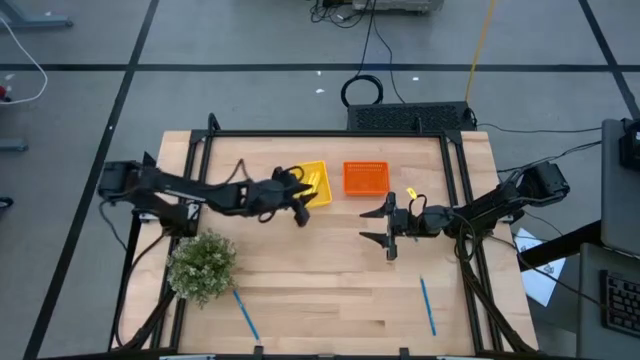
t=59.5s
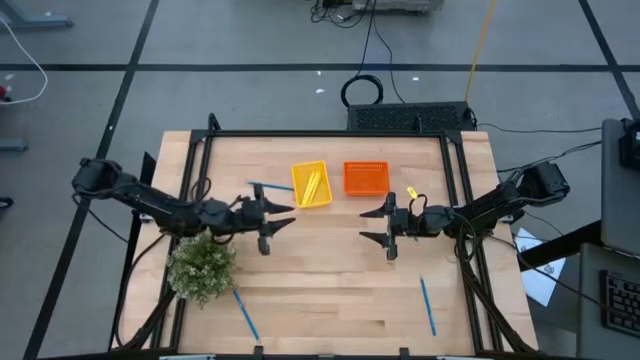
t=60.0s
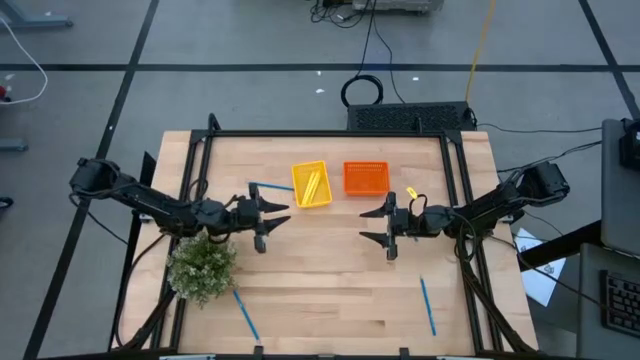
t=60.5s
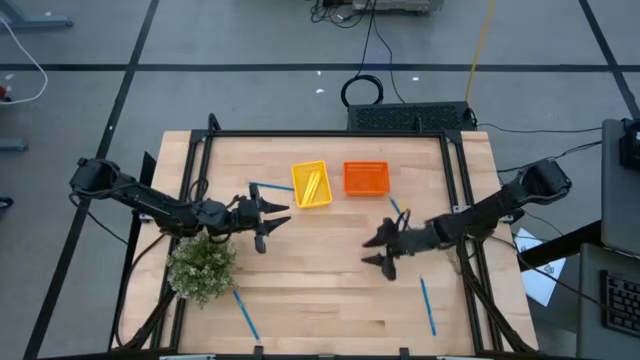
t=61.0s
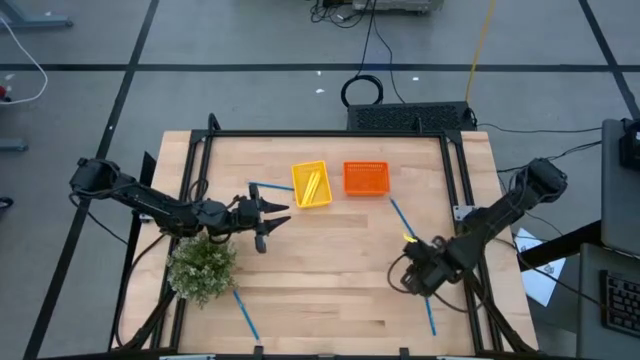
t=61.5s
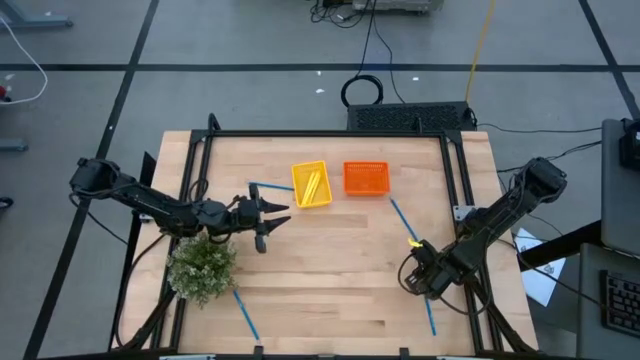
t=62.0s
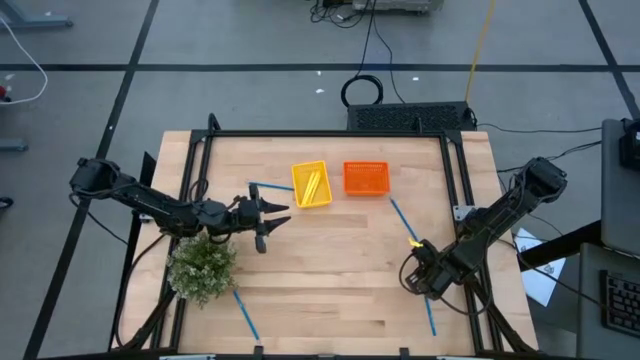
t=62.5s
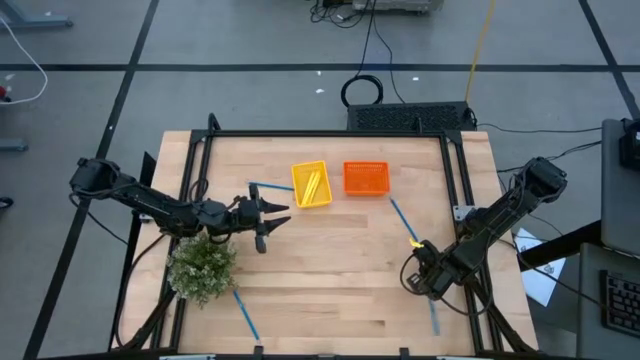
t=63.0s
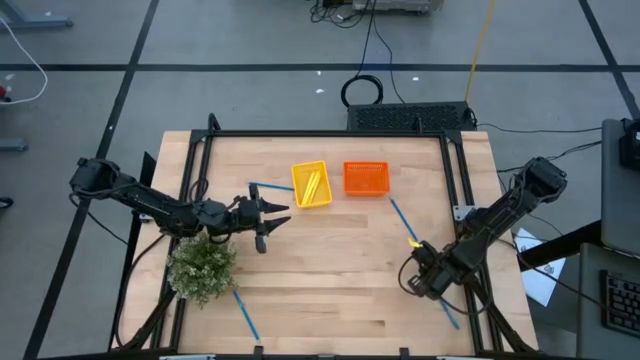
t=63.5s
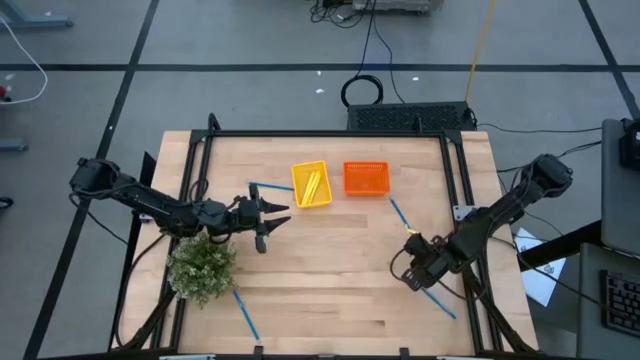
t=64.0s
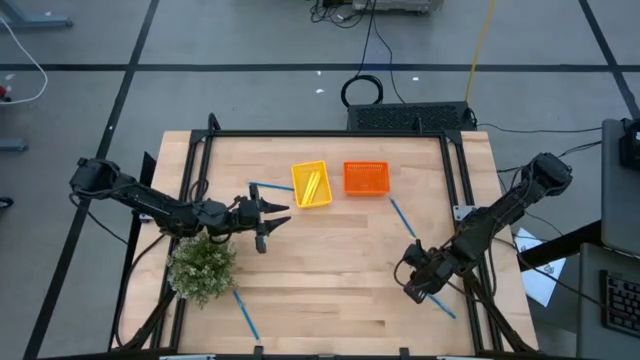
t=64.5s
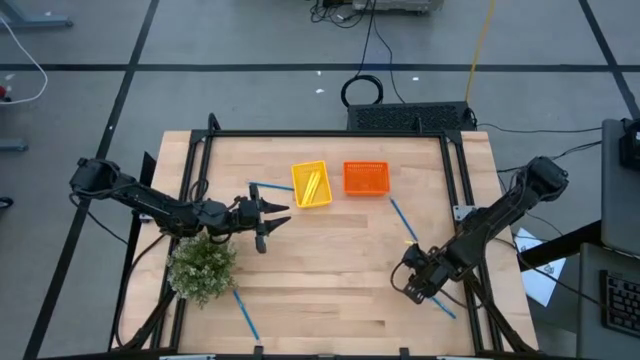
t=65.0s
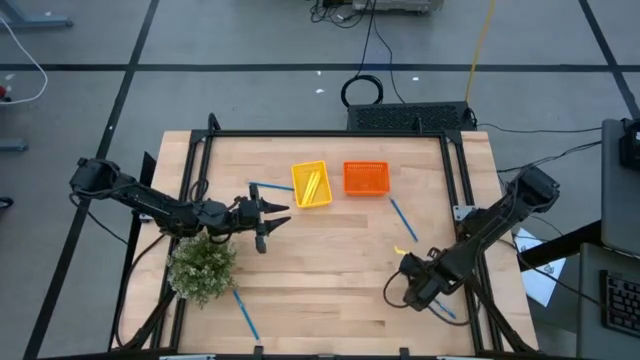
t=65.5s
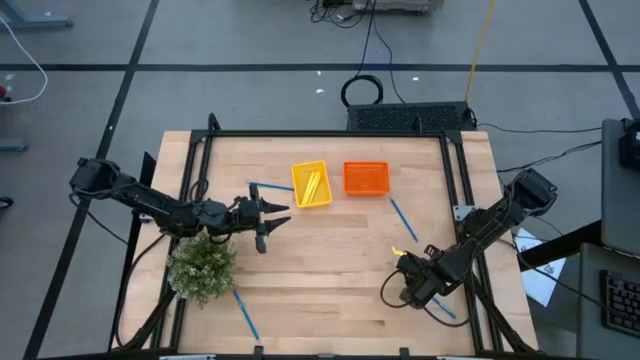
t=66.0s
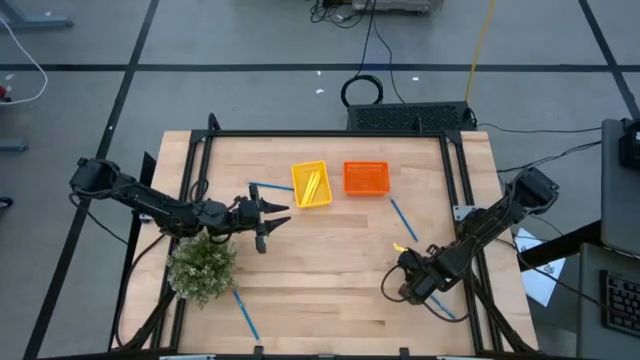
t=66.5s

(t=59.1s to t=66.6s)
Task: Sort pens & pencils
Put the bottom right blue pencil into the orange basket

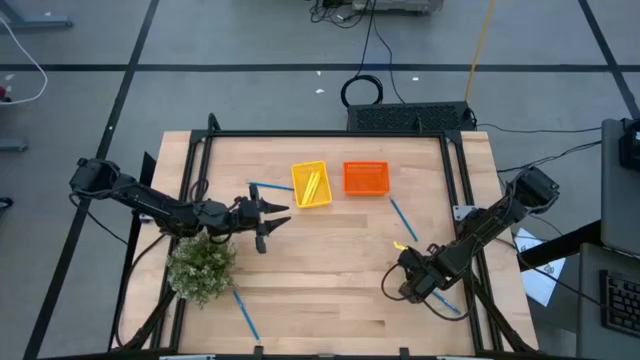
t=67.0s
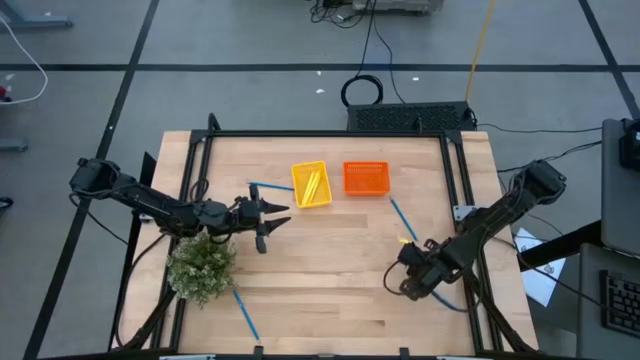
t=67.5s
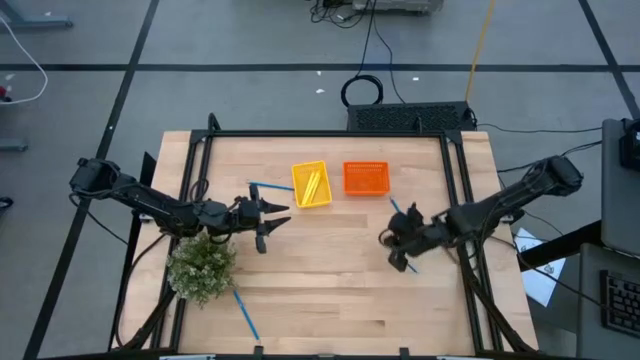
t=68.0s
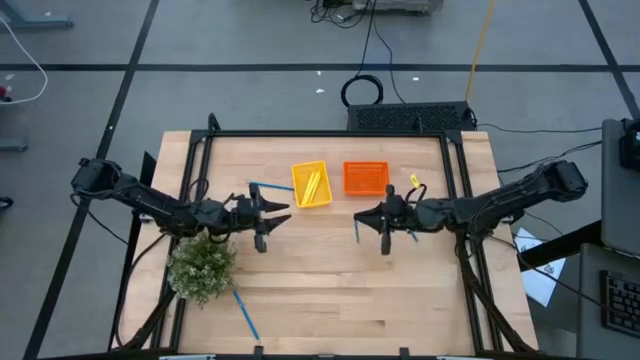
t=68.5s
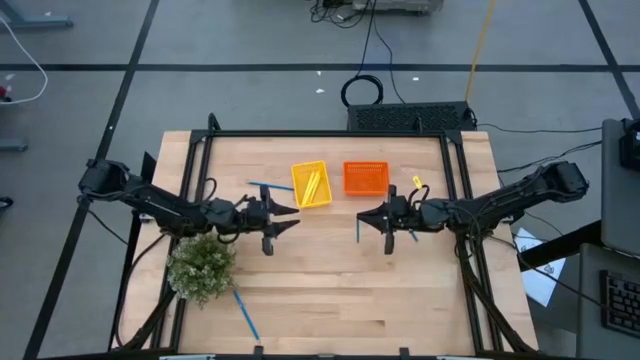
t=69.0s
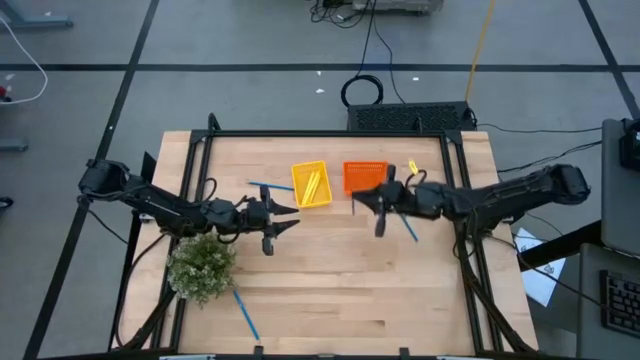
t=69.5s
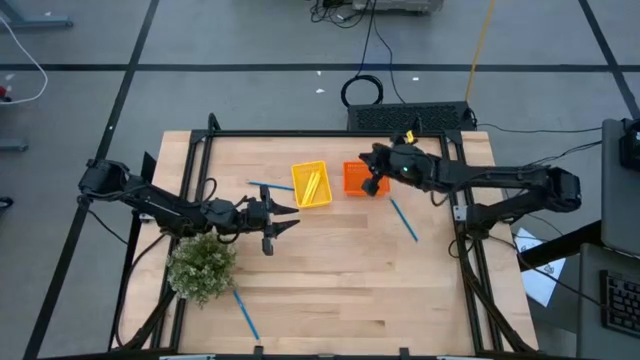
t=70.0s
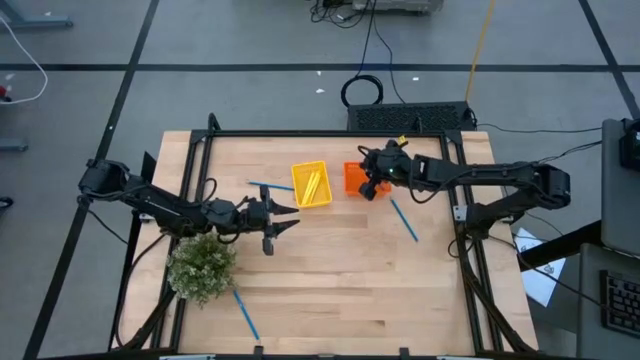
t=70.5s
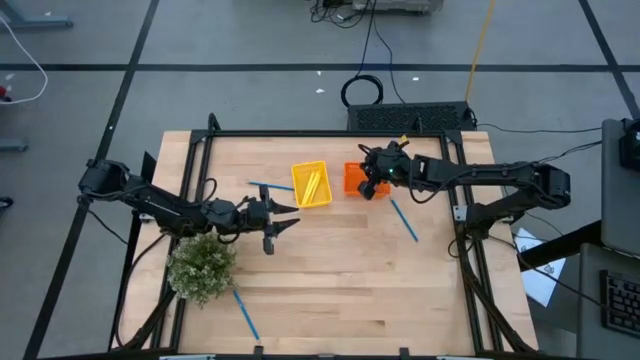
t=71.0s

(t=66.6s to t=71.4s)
Put the bottom right blue pencil into the orange basket

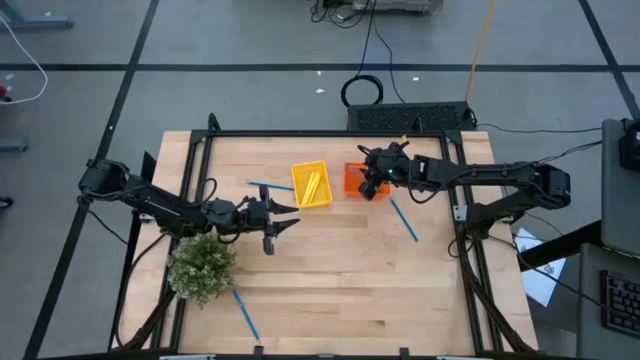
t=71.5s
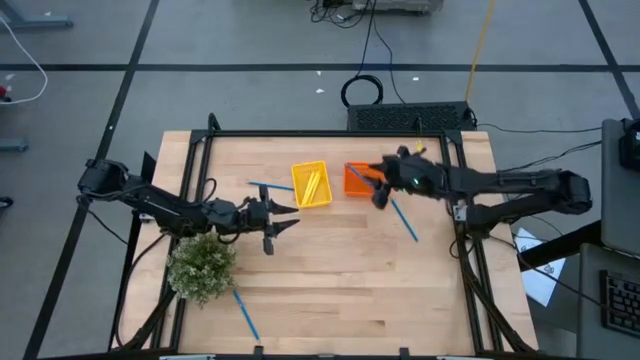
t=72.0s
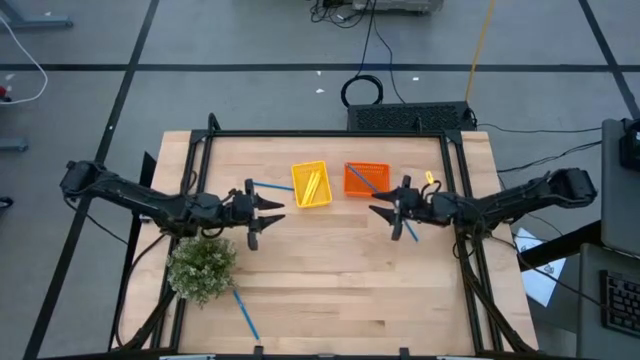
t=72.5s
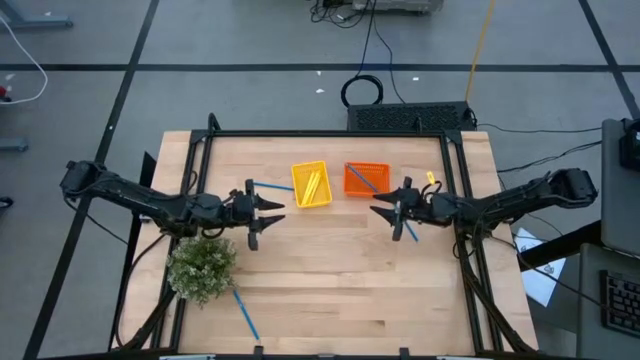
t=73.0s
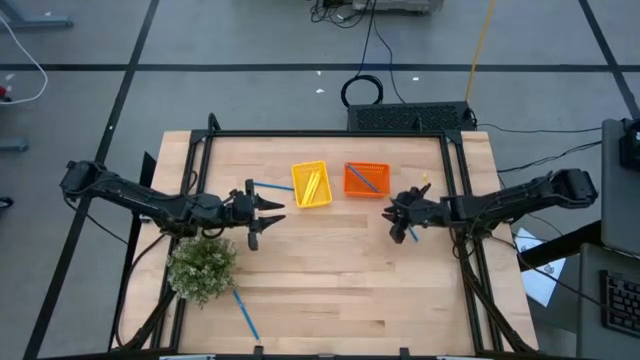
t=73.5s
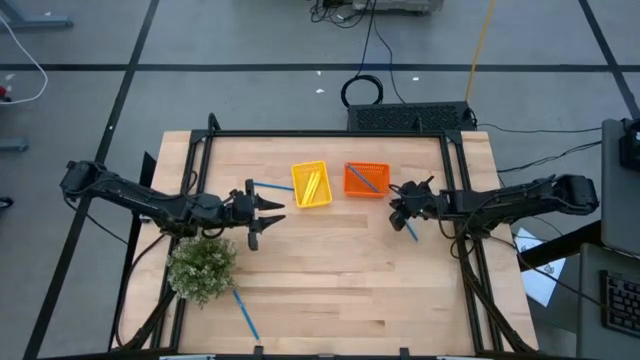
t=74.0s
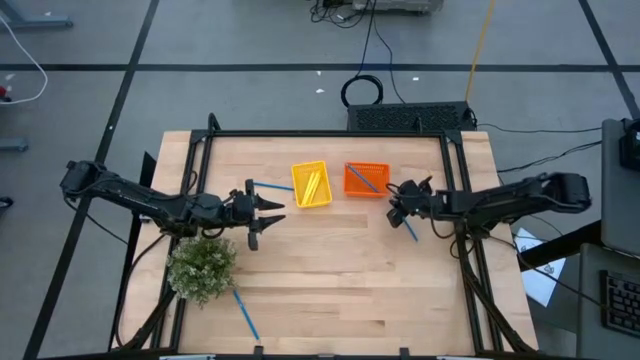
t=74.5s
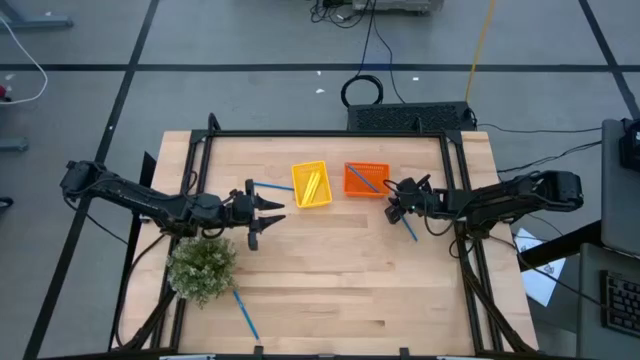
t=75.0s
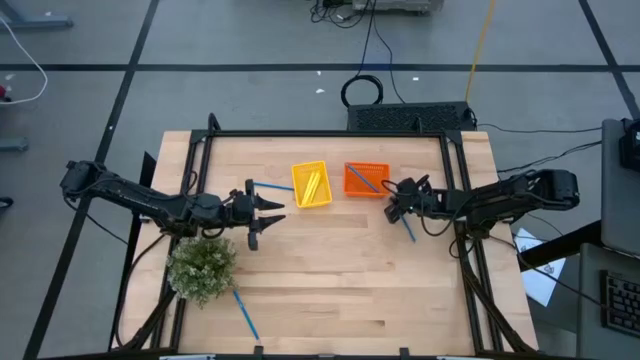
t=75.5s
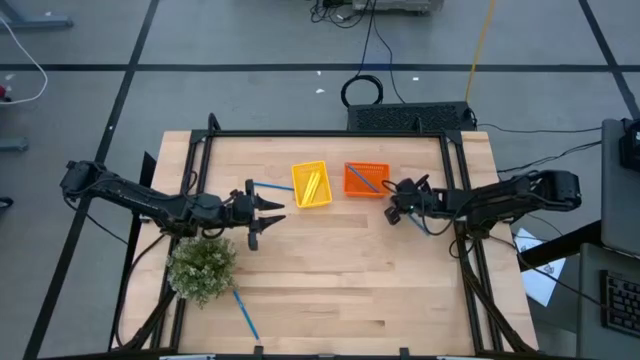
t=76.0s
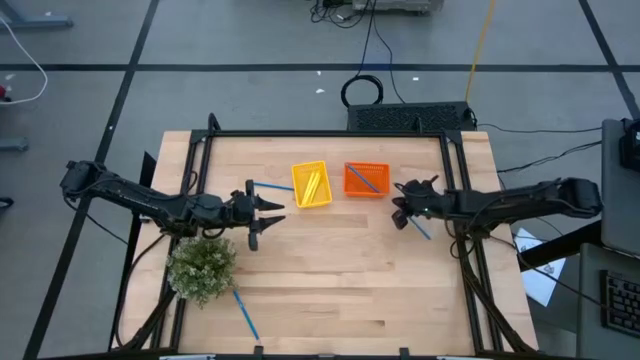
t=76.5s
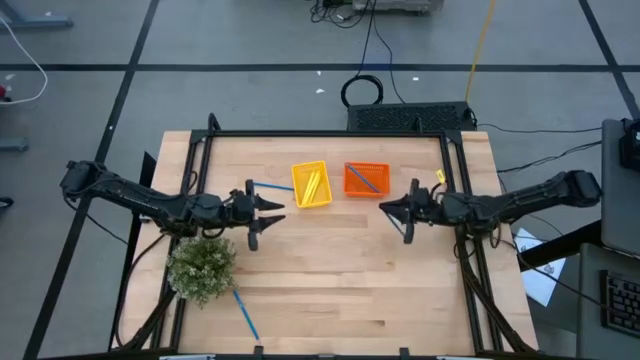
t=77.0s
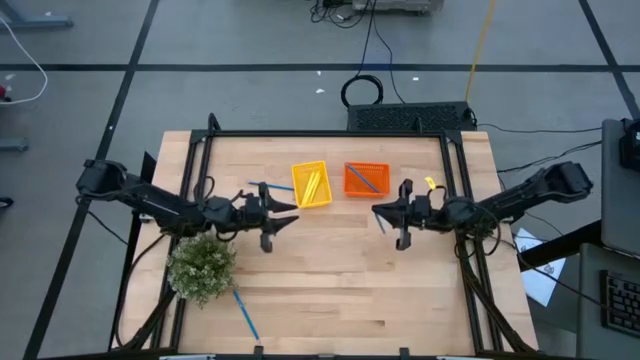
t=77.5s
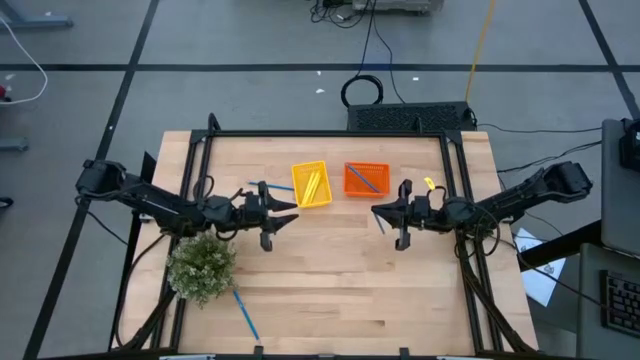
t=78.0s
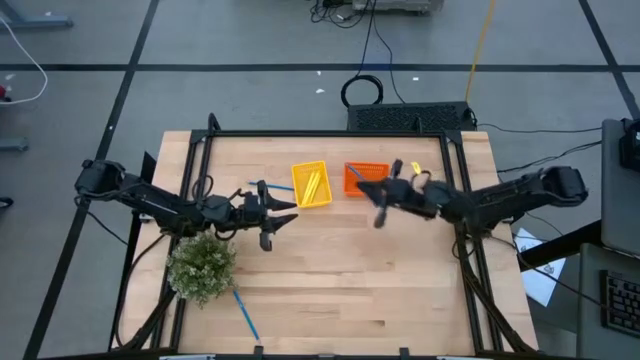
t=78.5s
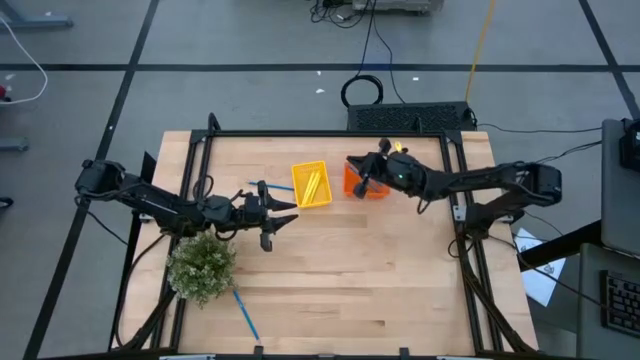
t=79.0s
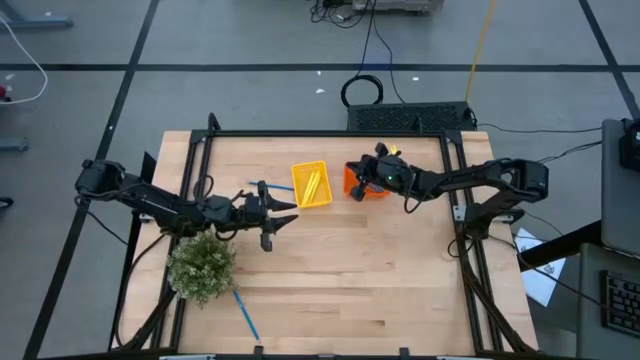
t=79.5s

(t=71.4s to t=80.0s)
Put the top right blue pencil into the orange basket

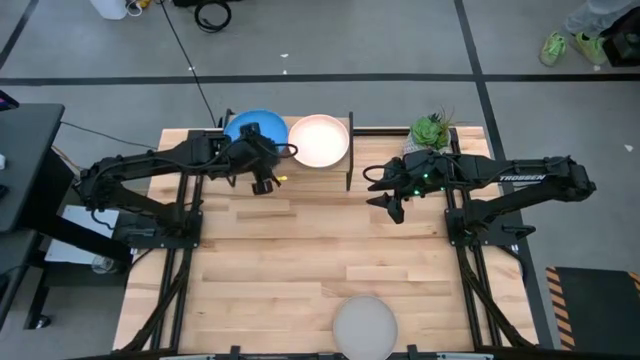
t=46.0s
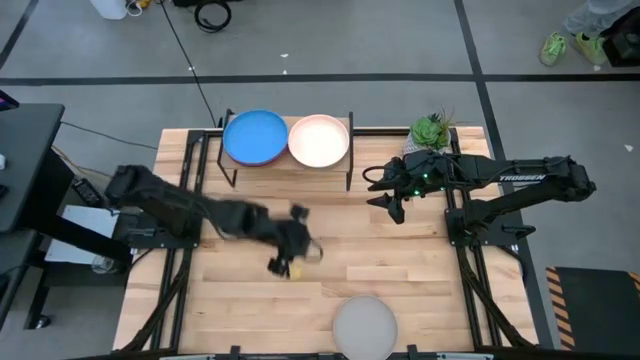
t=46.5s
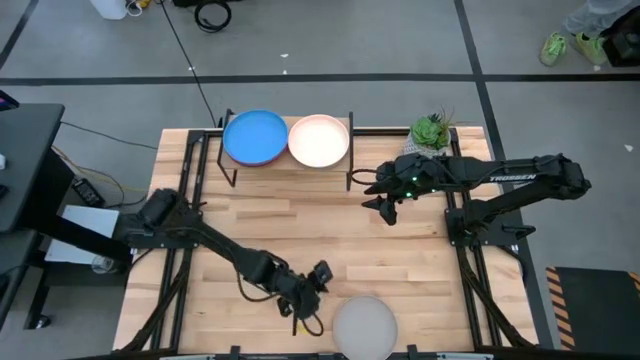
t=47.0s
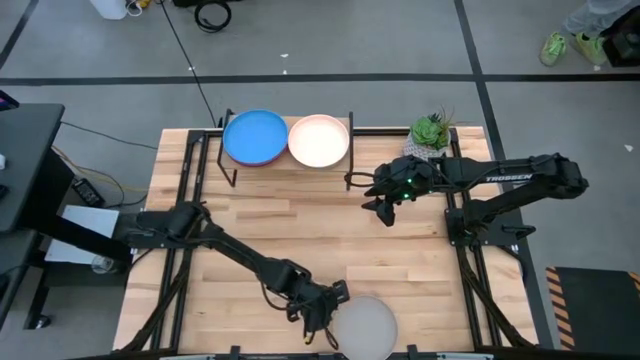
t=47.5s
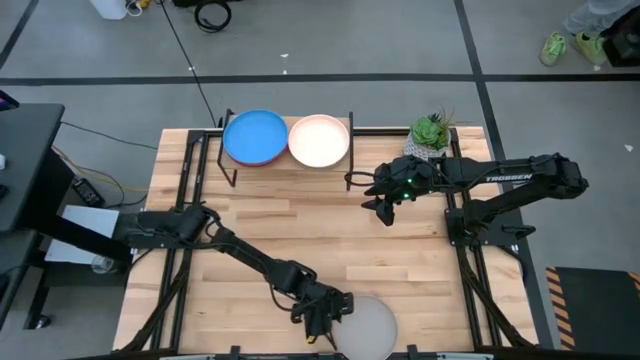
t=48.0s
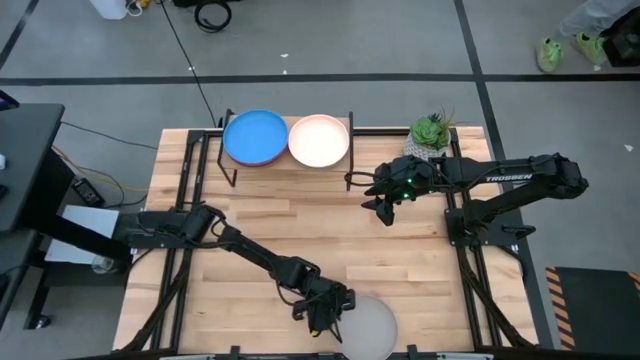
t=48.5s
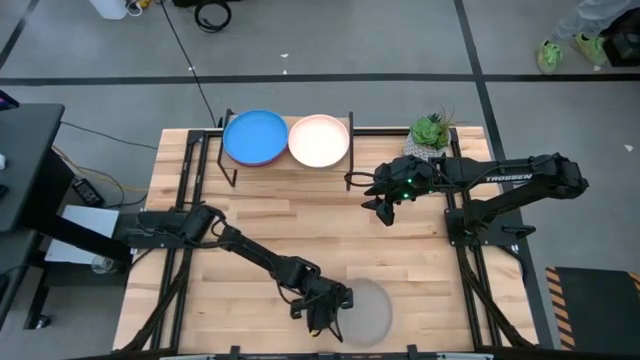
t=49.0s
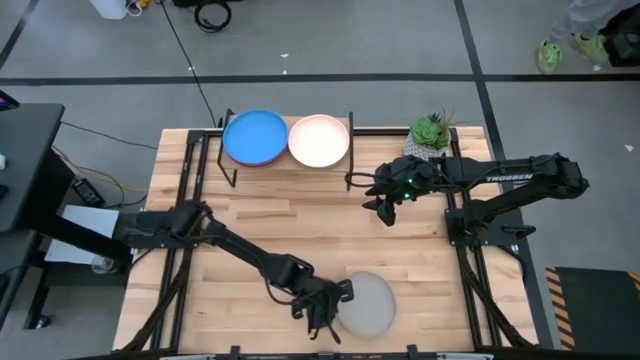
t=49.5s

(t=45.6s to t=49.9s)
Task: Place and stack plates onto a shelf
Stack the gray plate on top of the light orange plate on the shelf
